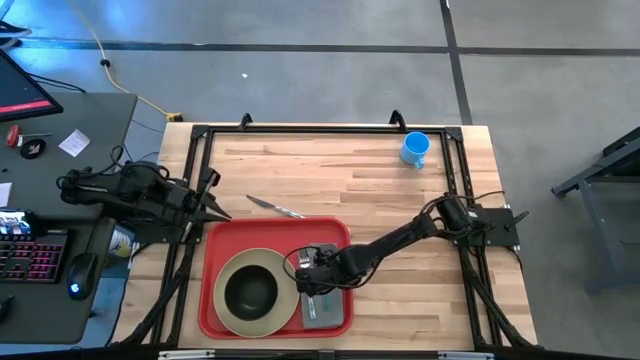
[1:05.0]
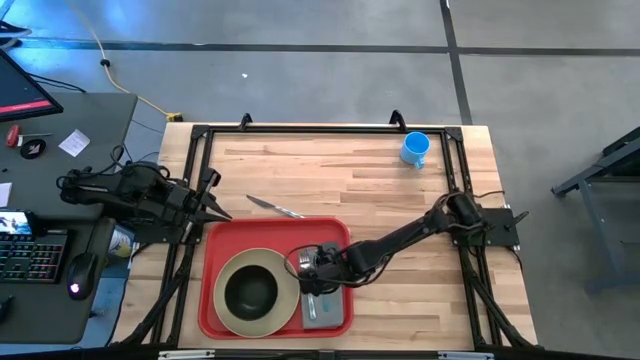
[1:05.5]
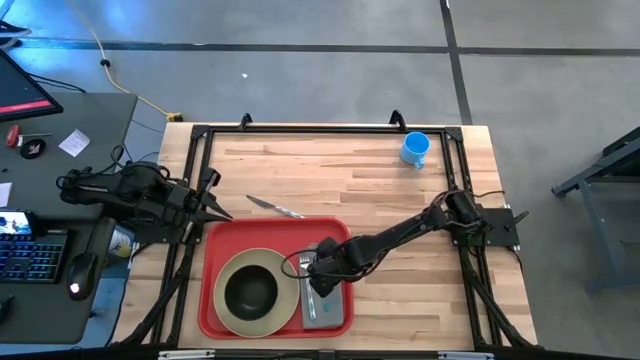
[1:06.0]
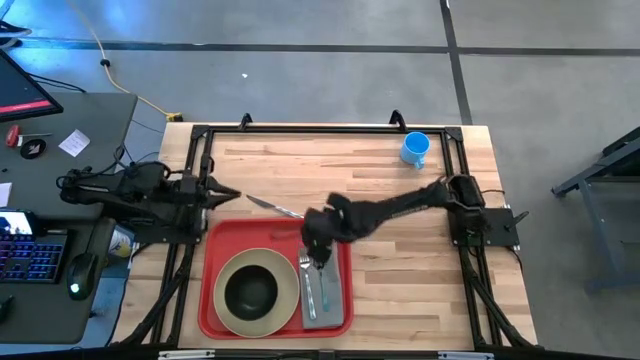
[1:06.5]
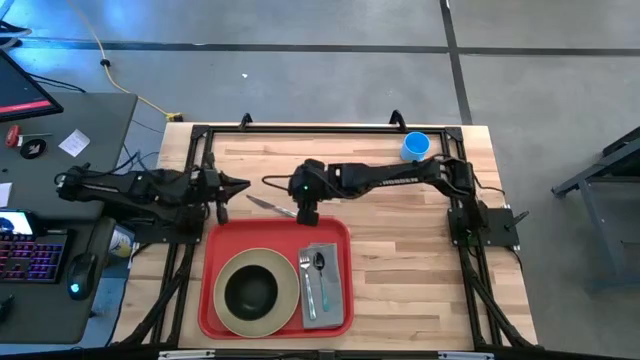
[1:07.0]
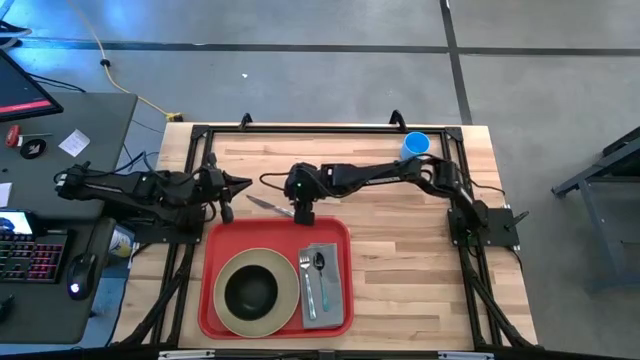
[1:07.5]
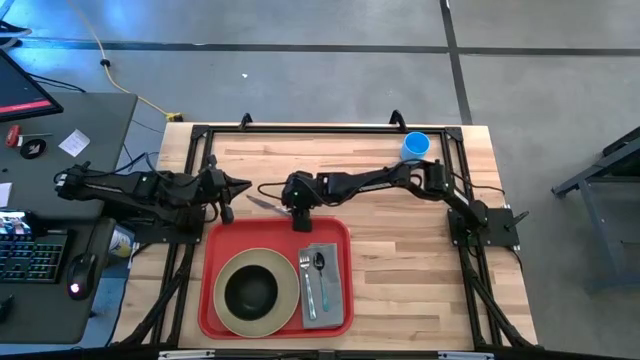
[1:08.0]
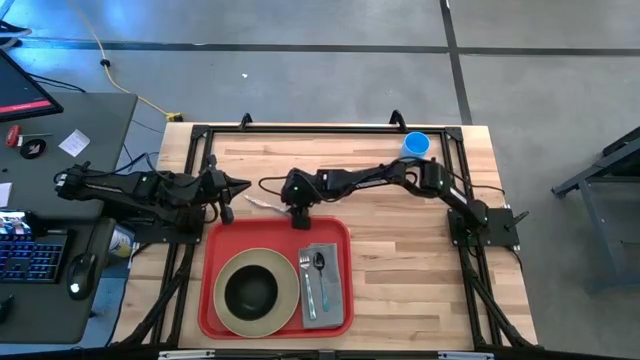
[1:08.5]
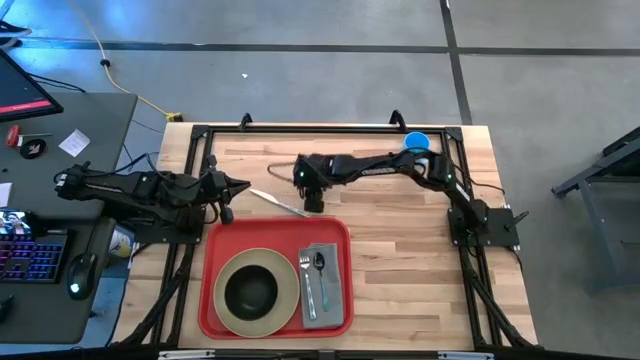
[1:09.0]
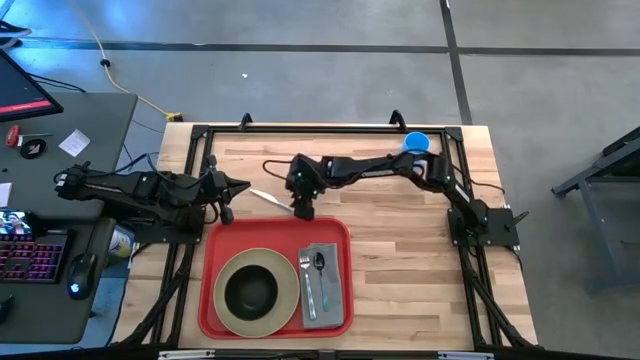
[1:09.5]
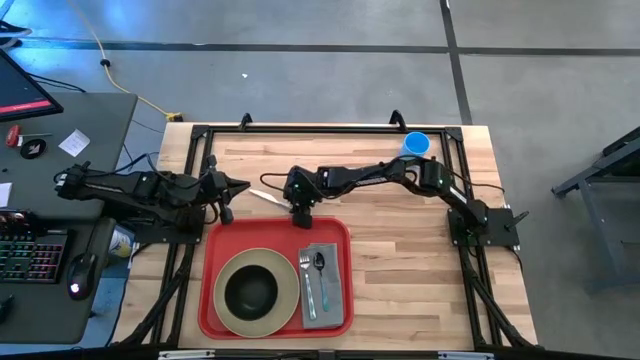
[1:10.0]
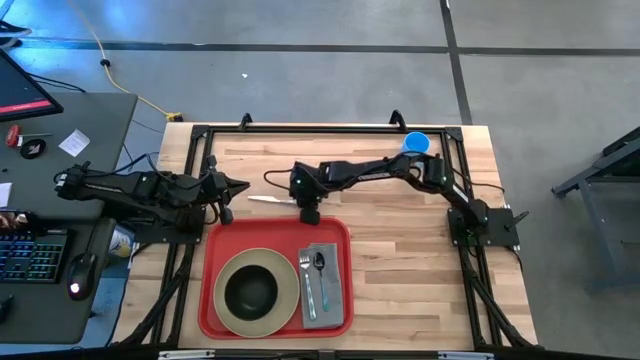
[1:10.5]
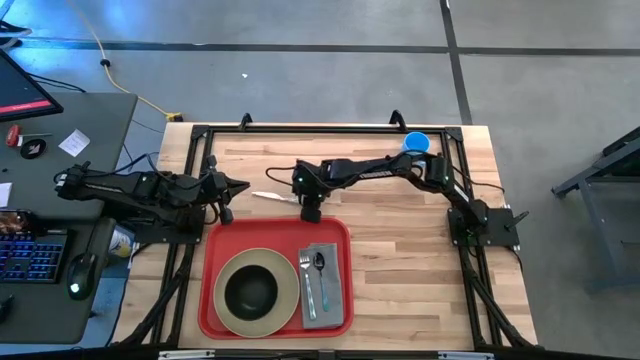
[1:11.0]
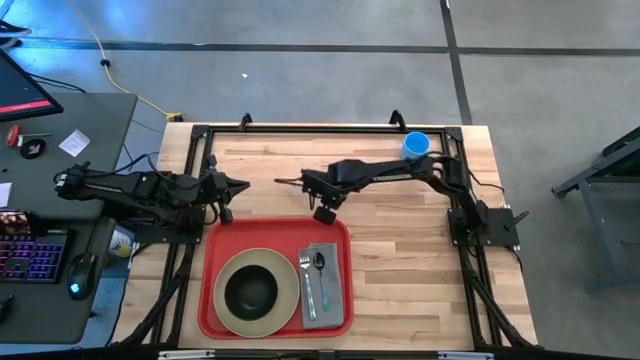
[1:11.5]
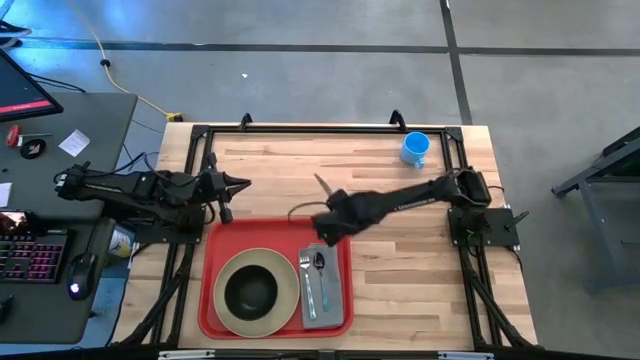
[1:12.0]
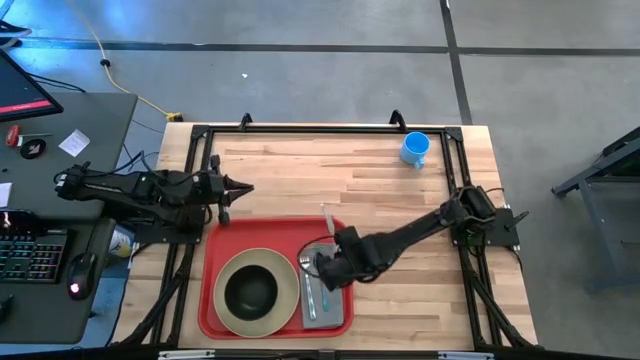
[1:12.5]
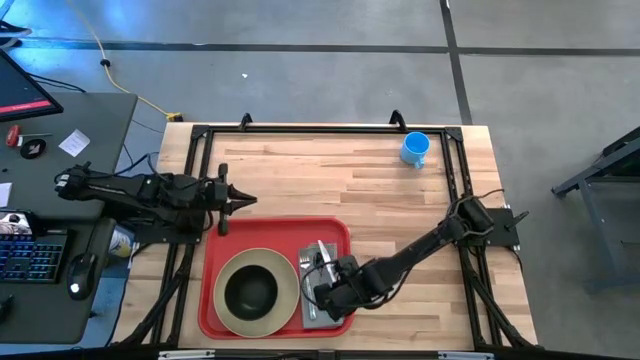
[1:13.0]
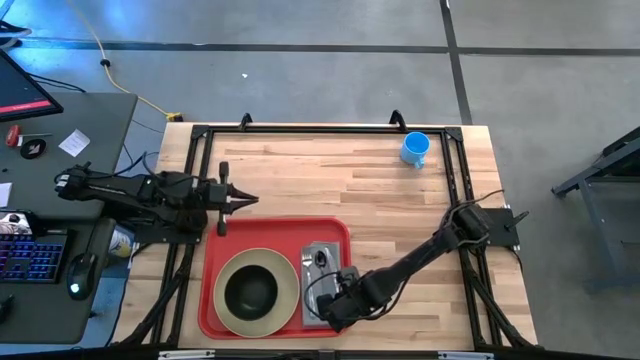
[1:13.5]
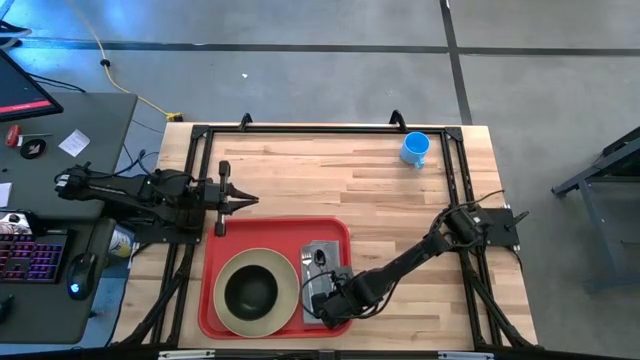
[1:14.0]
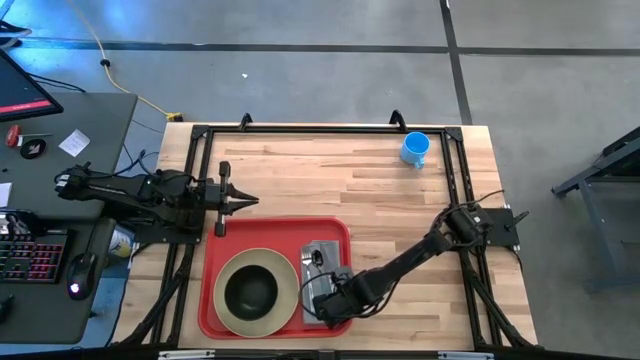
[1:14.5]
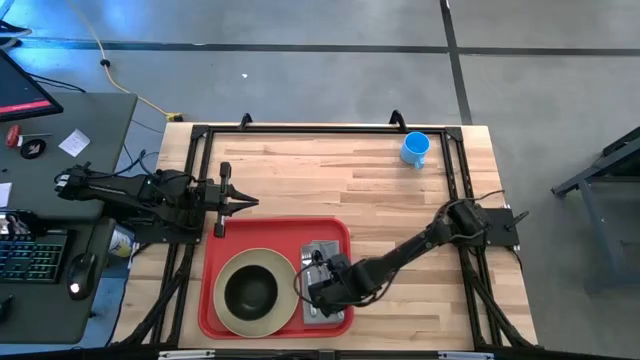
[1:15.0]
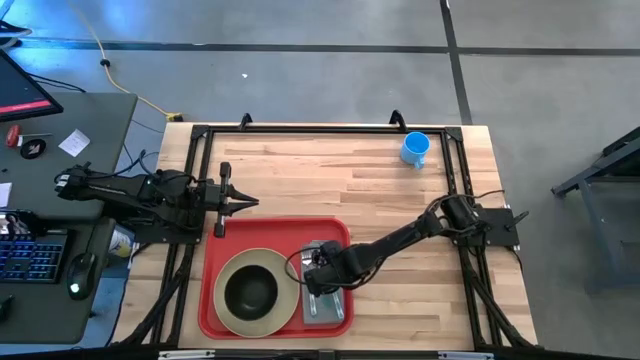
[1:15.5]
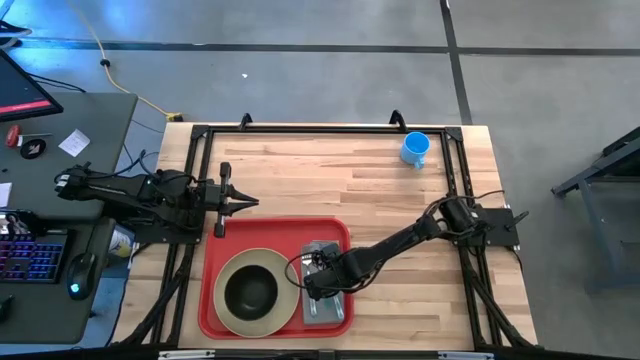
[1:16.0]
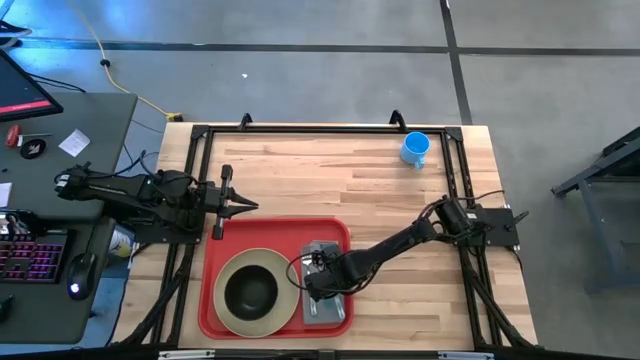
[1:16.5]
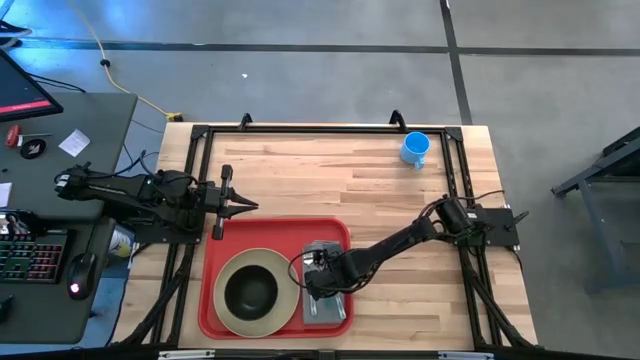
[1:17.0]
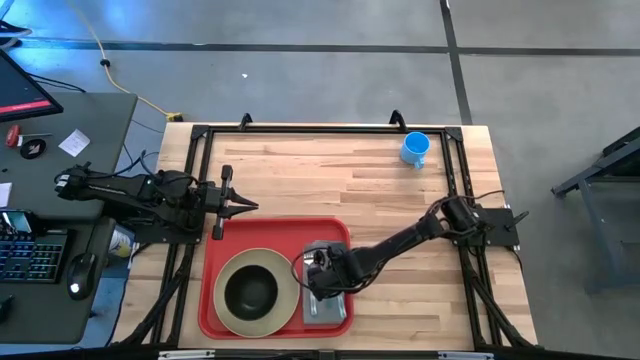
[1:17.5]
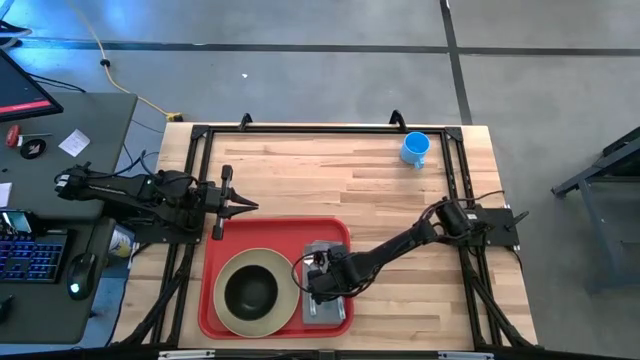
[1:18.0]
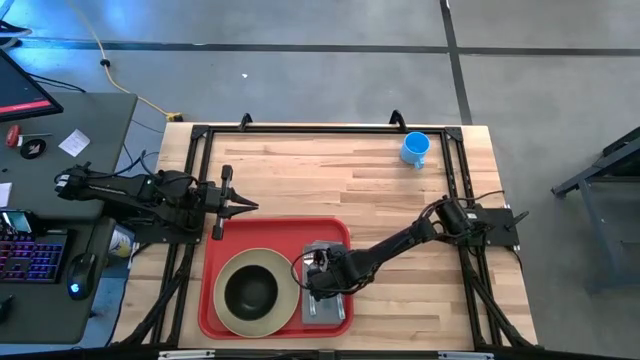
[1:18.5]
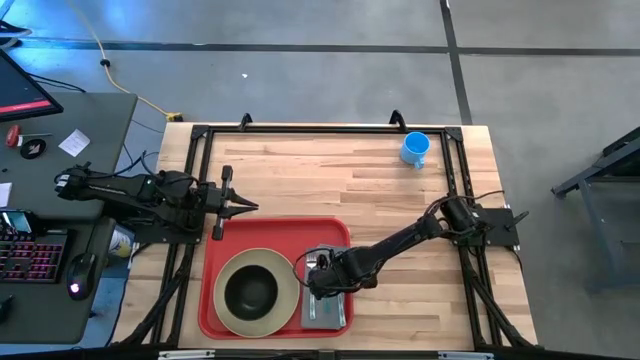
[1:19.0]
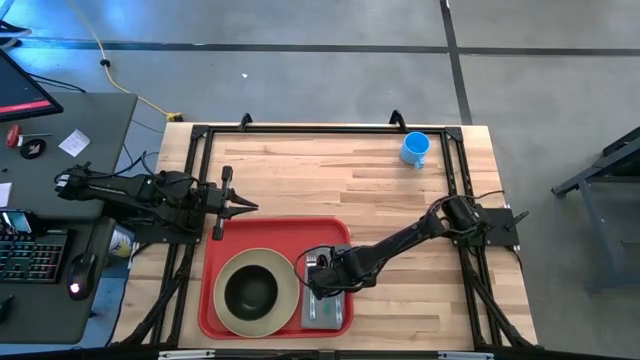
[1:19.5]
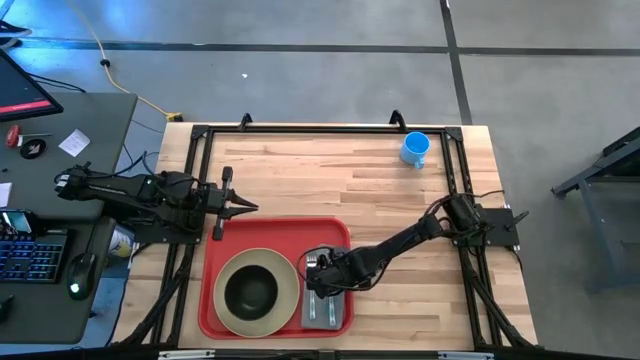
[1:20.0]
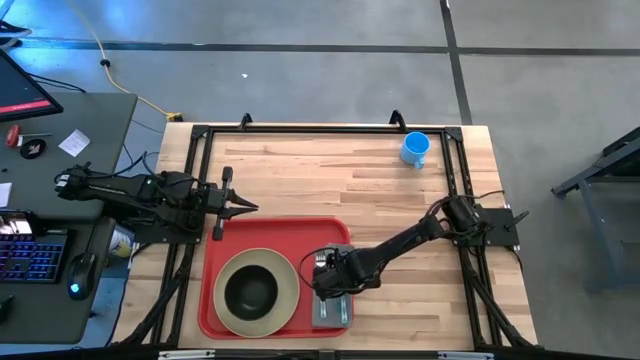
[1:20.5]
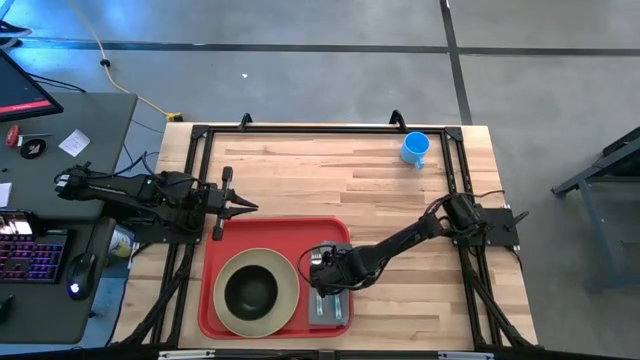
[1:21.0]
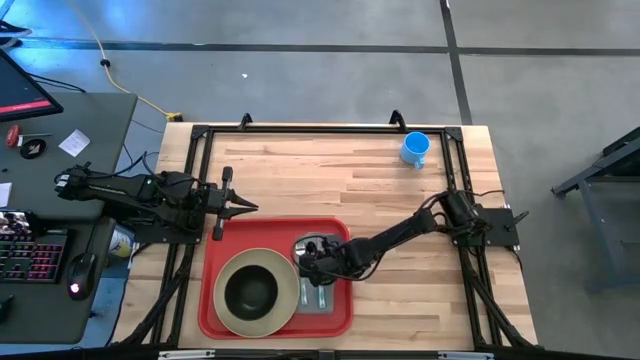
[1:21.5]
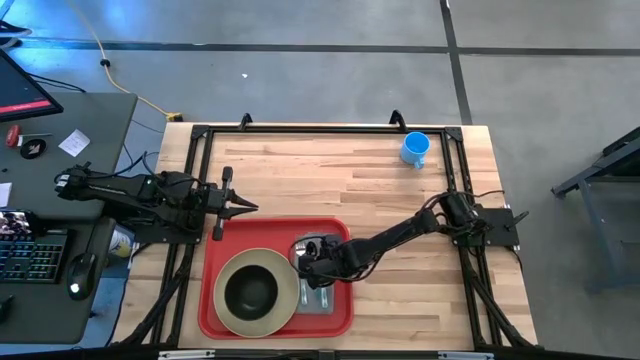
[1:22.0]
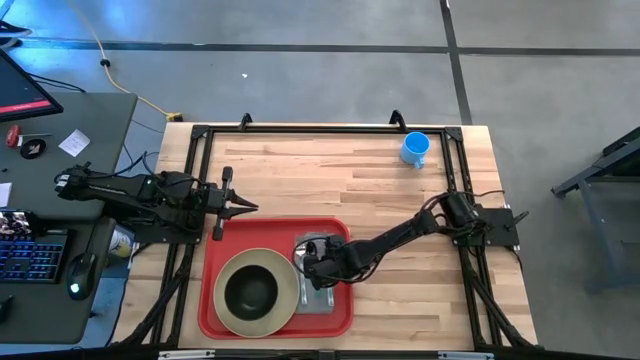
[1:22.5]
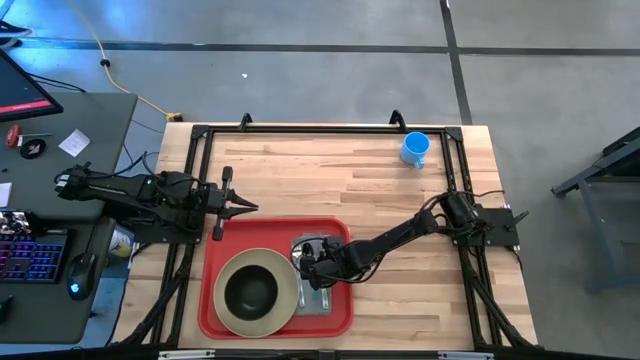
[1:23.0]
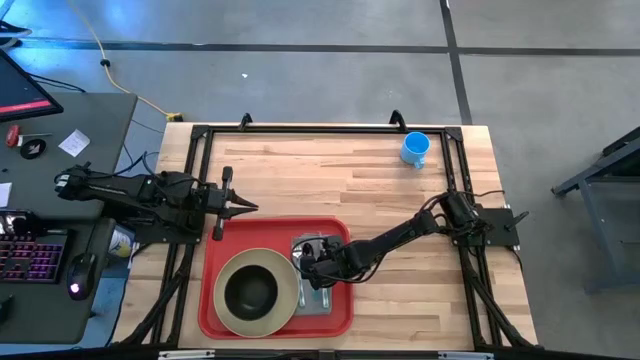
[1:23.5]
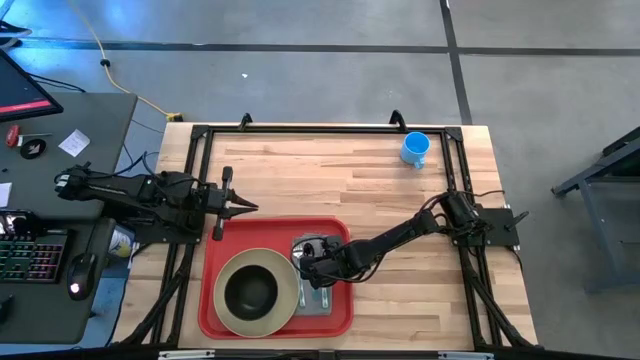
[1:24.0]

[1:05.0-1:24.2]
Task: Set up tray
Put the white patterned table knife on top of the gray table napkin to the right of the blue spoon
